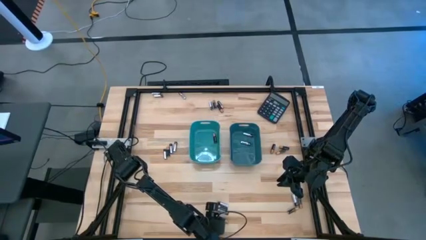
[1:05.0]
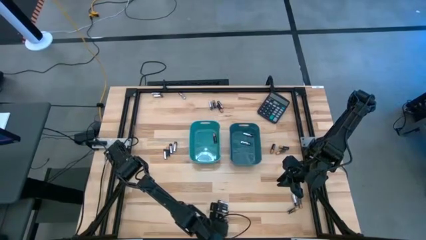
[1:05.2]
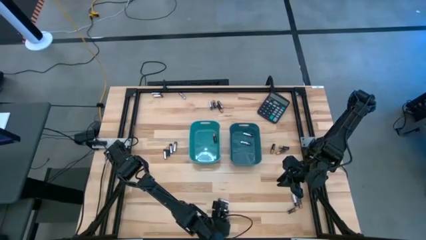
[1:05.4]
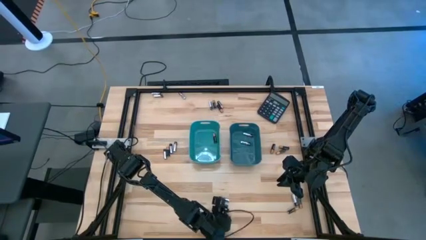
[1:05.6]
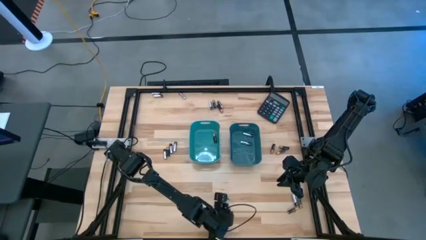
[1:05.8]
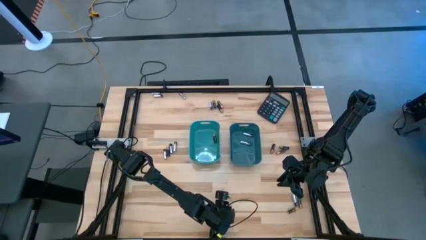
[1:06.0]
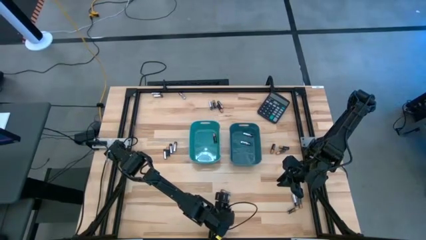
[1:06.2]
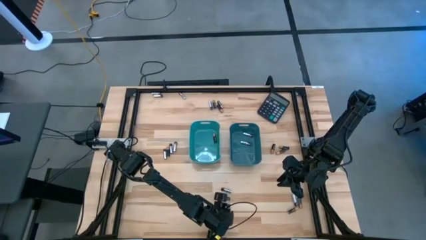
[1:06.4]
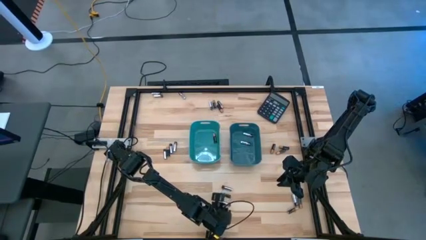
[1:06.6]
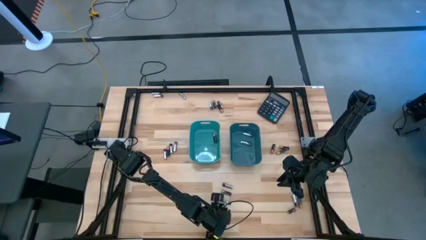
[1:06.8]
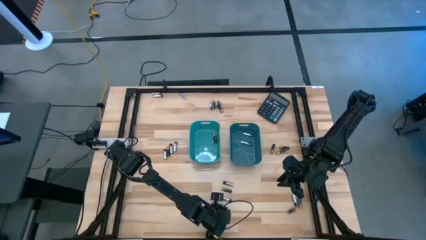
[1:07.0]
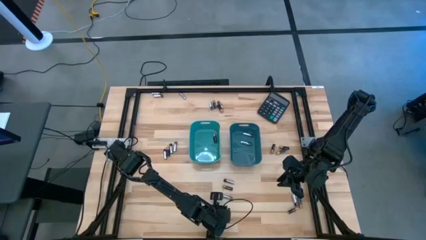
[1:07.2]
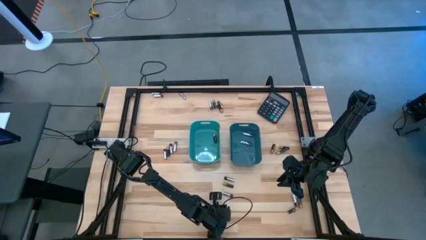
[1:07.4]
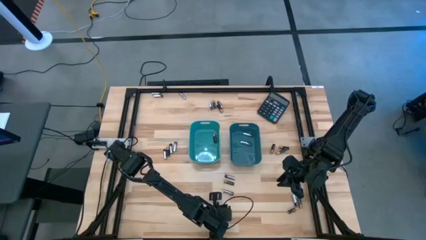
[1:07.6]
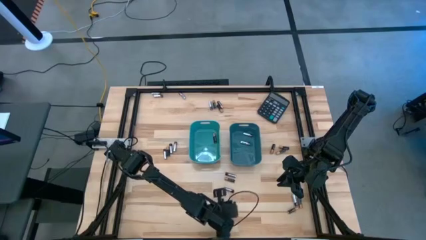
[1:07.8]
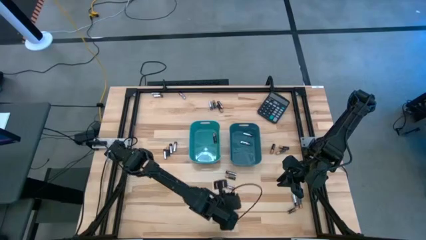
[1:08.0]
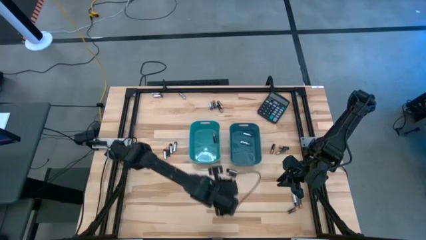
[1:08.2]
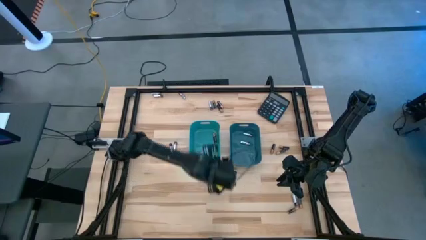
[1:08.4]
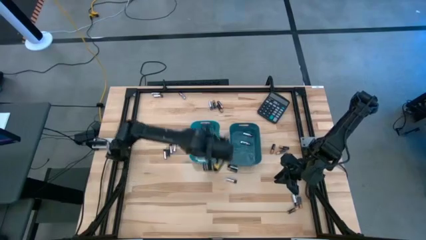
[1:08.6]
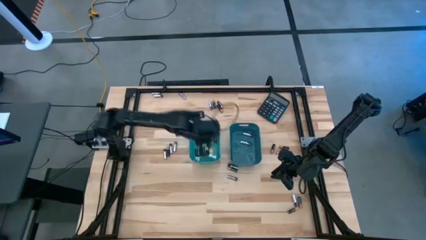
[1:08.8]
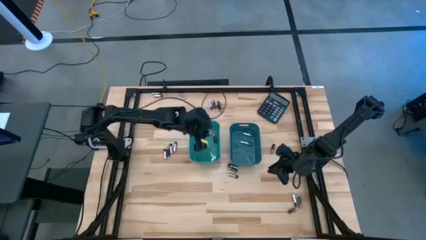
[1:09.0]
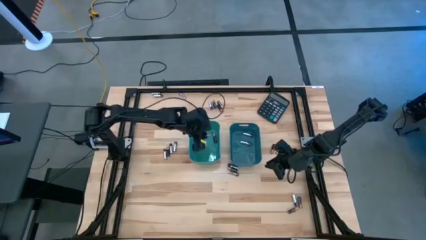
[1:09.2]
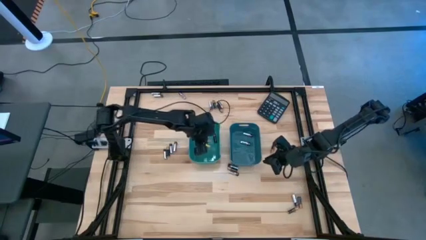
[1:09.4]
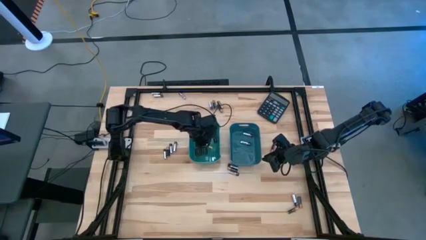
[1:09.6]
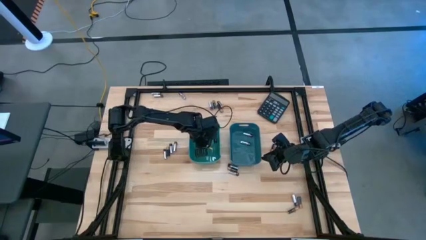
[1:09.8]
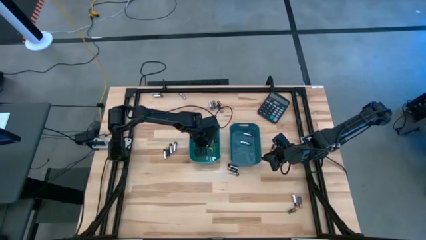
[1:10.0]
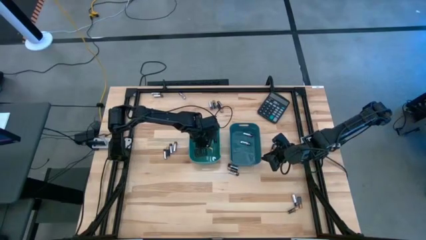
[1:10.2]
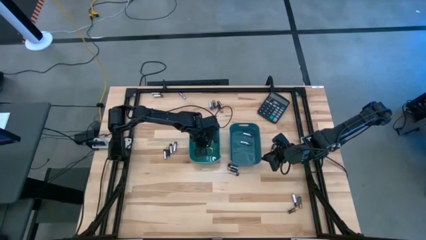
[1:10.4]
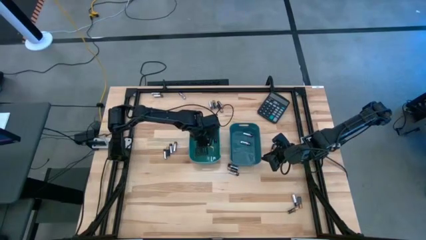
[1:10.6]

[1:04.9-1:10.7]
Task: Sort batteries
Put the black battery into the green bin

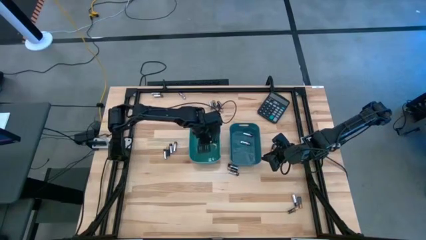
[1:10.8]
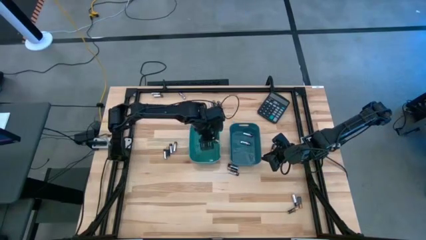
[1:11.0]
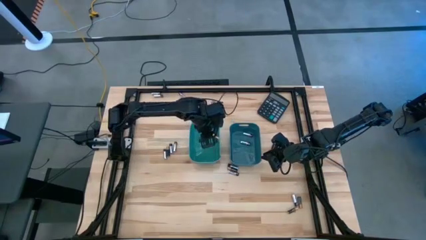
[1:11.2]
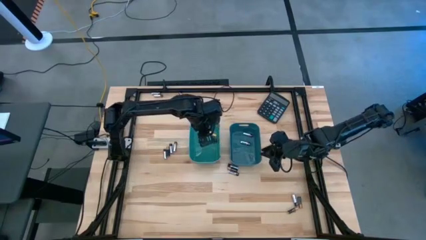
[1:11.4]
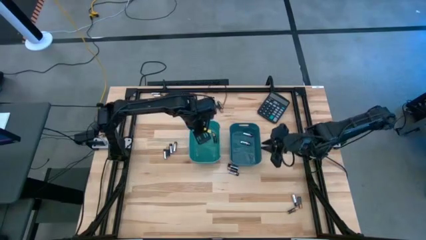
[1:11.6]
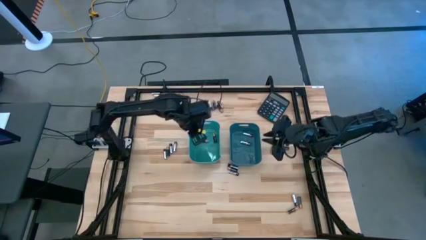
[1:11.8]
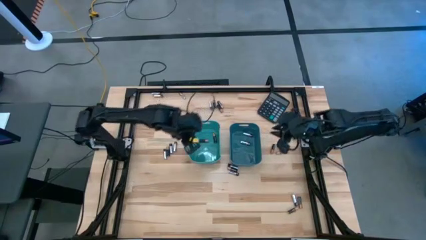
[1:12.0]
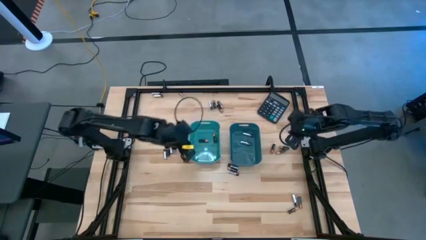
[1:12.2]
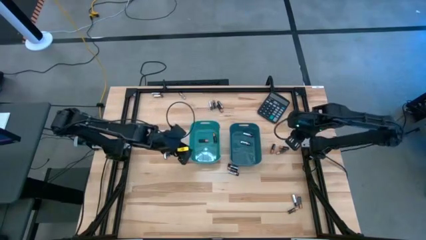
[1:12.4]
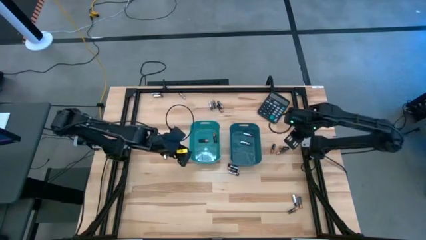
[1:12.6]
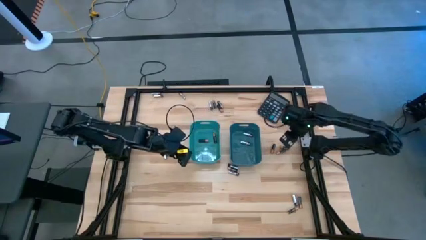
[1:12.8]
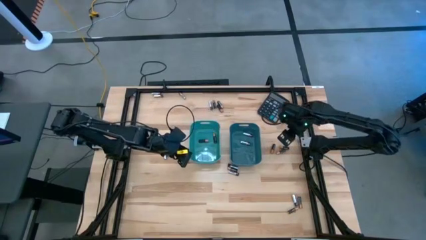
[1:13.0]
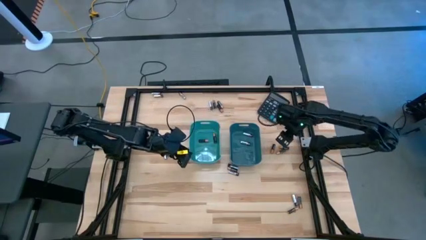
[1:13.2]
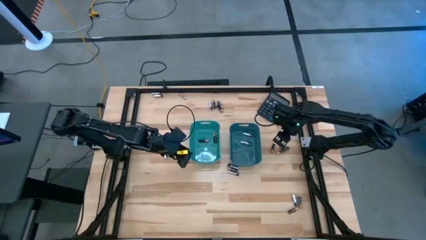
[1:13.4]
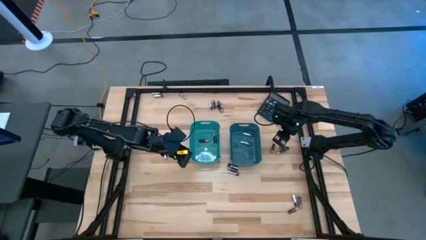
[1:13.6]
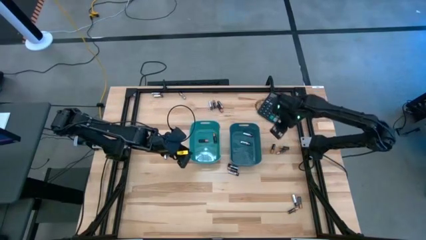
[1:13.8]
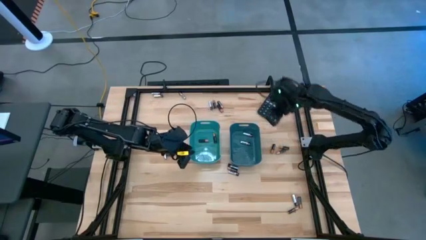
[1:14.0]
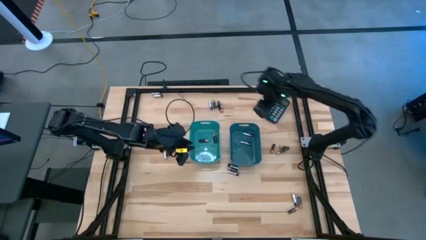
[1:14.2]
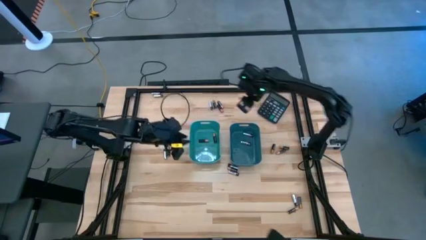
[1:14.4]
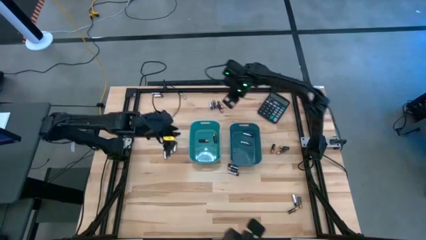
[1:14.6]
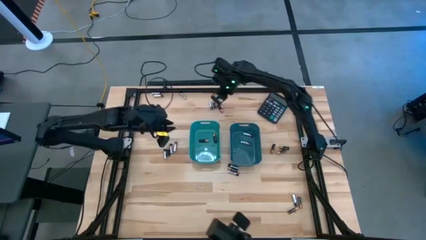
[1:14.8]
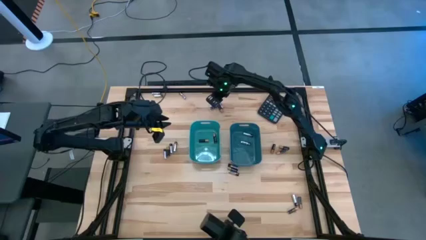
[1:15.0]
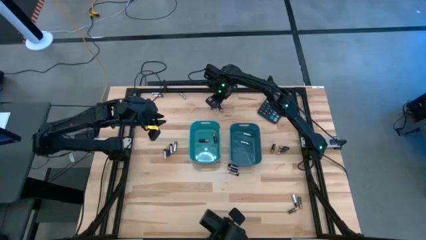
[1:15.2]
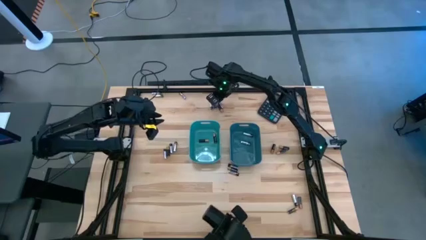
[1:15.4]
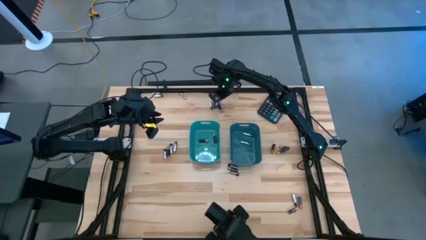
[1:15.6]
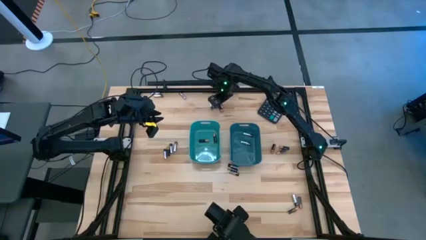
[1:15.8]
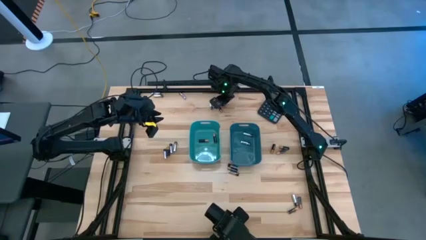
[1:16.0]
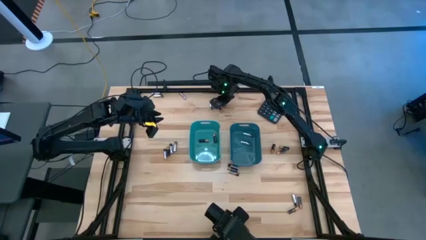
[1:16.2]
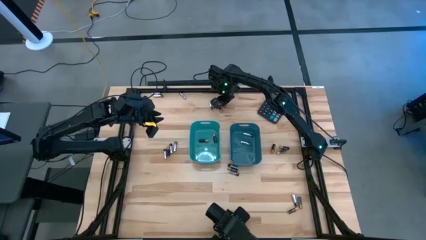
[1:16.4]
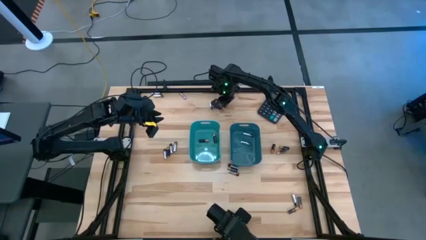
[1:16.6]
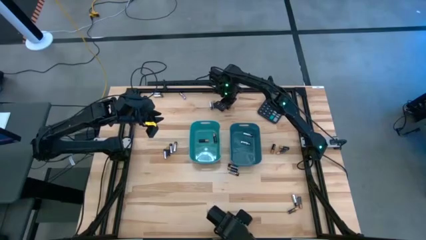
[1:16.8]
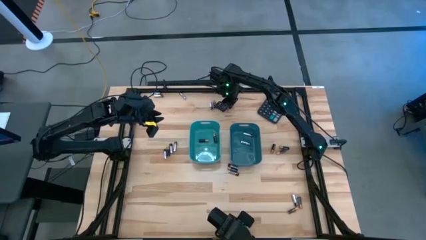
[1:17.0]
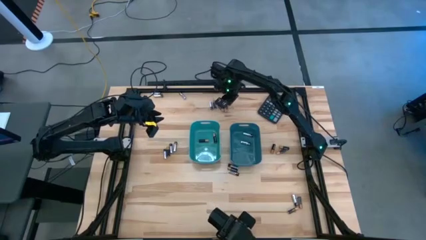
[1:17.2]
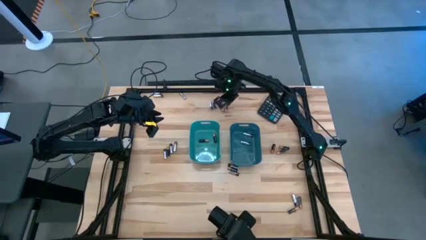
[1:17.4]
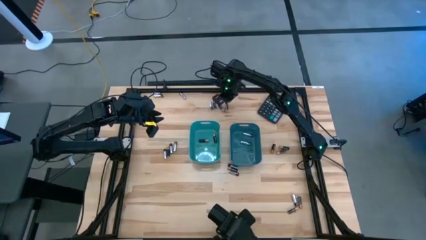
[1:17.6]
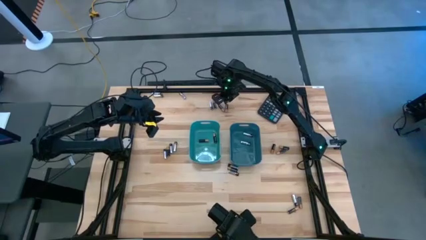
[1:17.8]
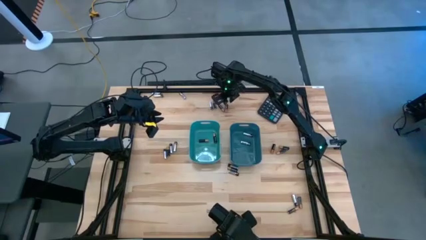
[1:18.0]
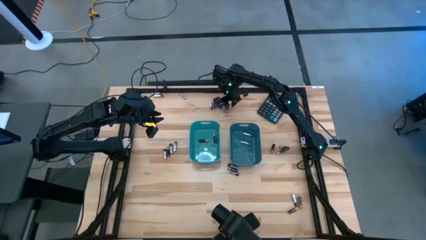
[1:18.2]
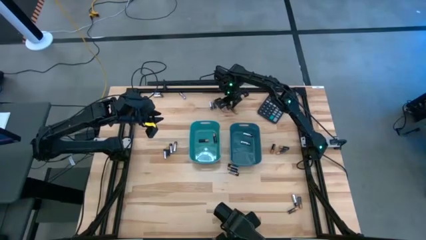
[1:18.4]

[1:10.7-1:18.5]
Put the black battery into the green bin
